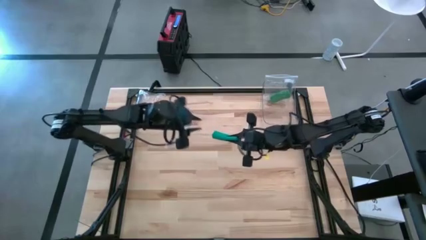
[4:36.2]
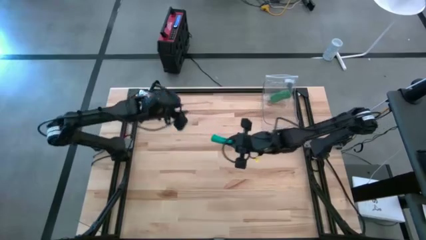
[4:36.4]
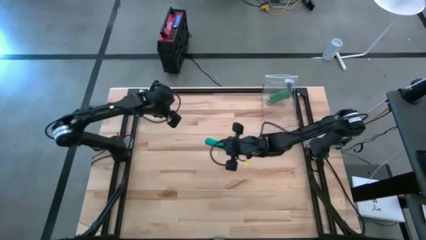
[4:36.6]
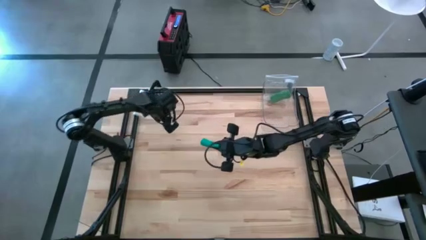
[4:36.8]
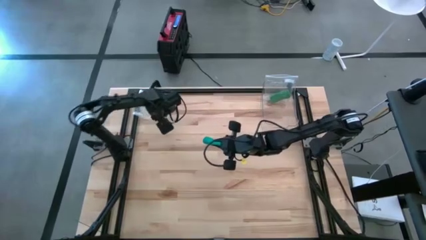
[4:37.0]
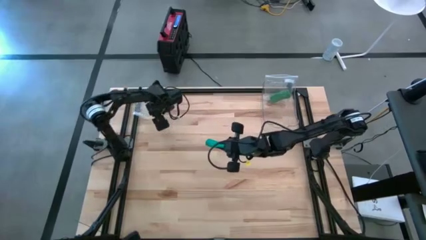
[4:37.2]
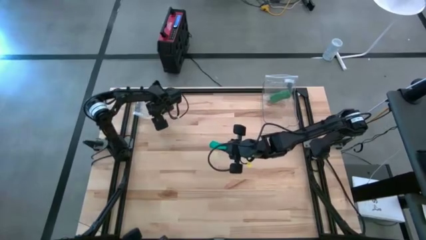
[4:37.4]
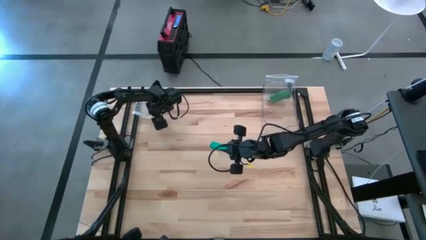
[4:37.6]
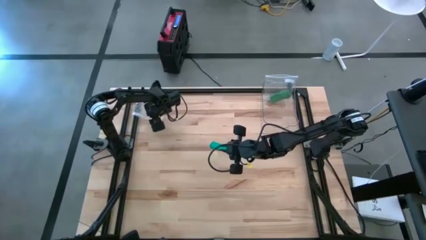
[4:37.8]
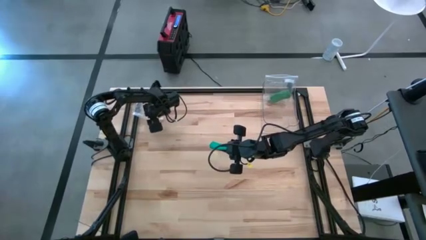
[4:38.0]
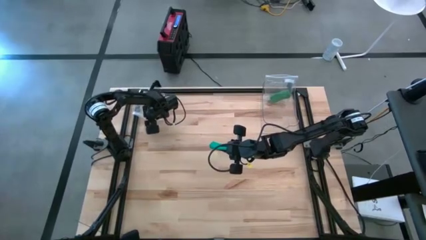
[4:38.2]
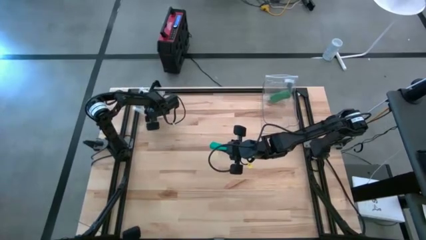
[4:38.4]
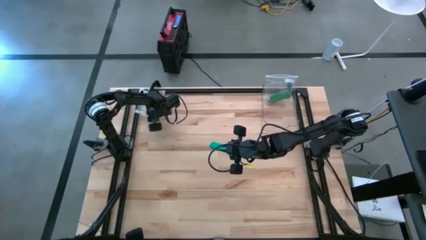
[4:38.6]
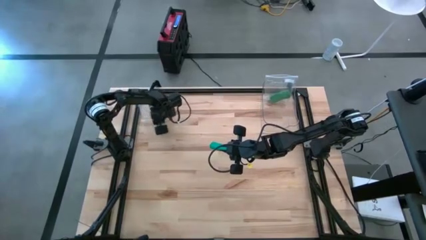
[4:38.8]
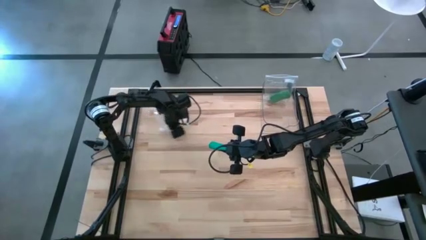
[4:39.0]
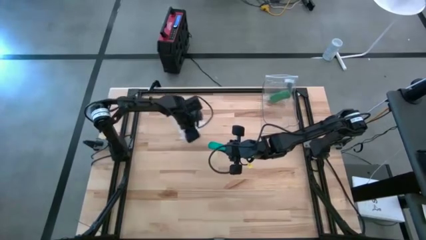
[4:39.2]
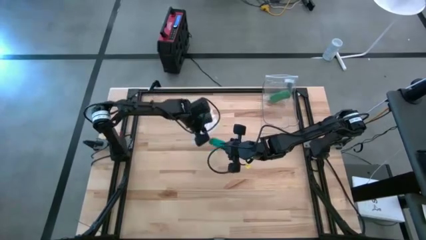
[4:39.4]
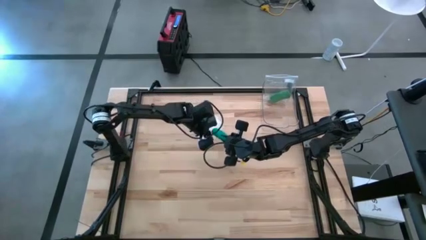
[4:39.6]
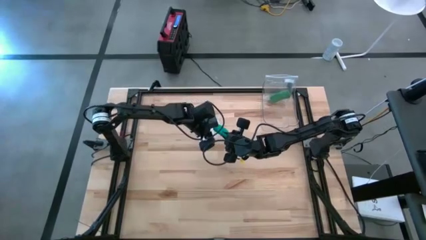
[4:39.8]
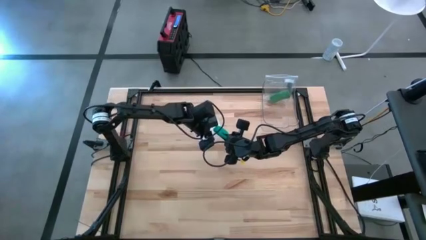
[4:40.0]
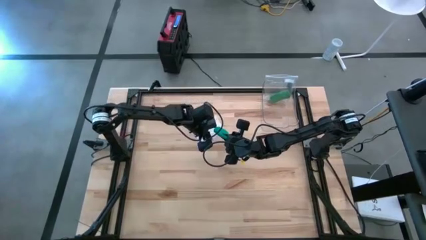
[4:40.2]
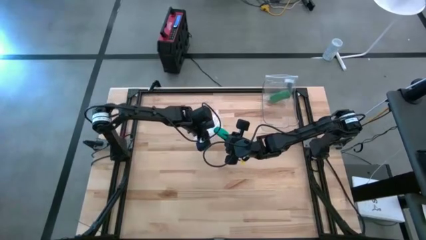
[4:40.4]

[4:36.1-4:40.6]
Task: Roll bandage
Put the rolled dark green bandage into the transparent zip bag

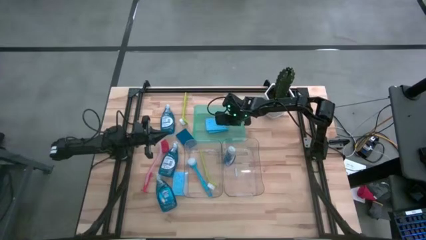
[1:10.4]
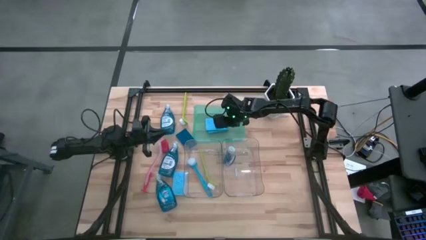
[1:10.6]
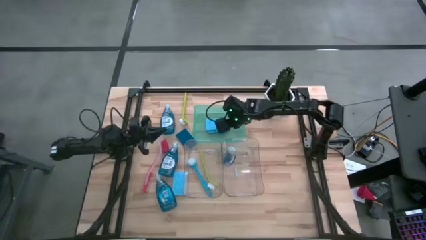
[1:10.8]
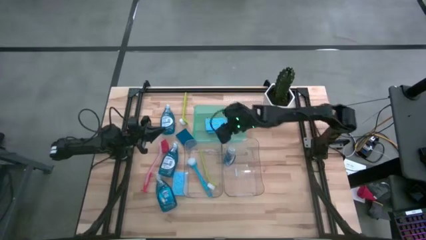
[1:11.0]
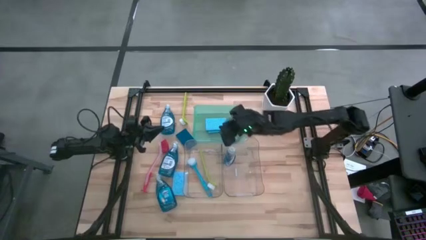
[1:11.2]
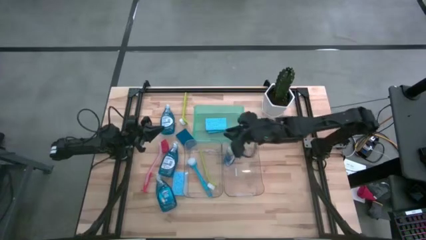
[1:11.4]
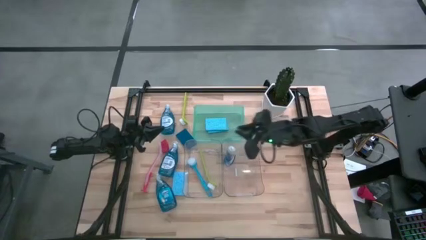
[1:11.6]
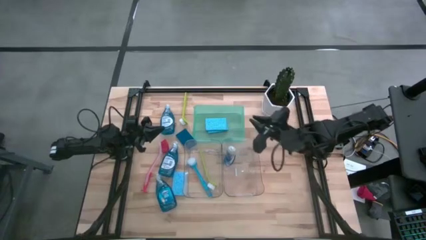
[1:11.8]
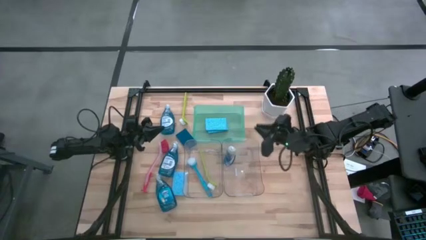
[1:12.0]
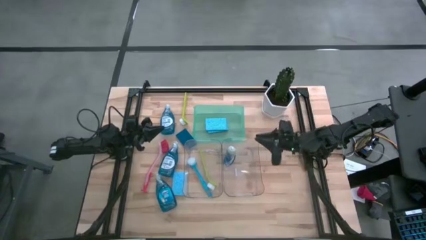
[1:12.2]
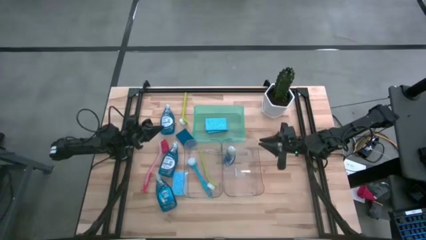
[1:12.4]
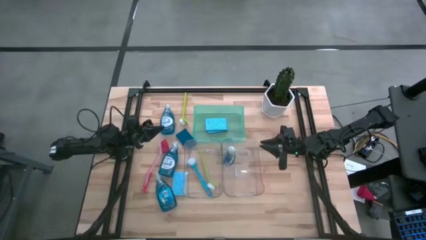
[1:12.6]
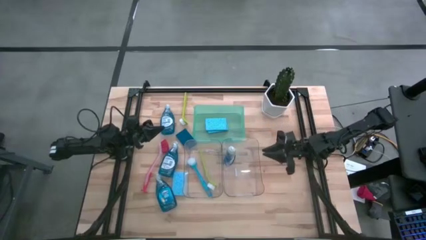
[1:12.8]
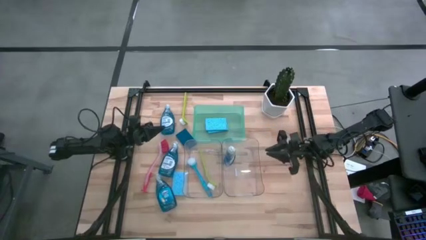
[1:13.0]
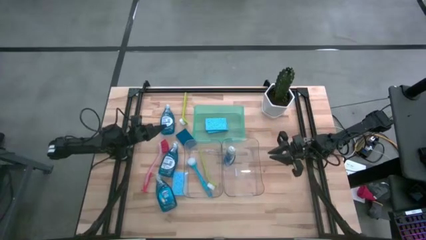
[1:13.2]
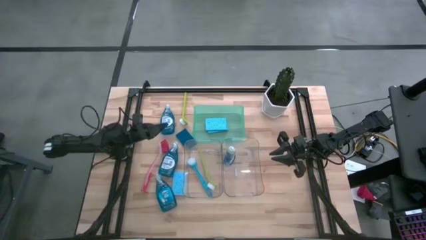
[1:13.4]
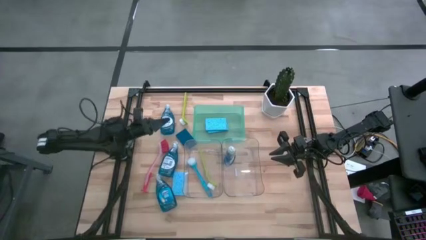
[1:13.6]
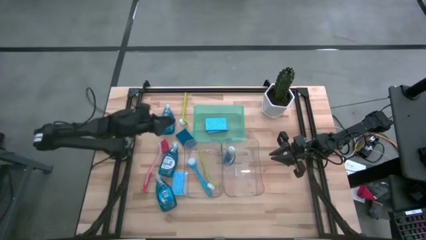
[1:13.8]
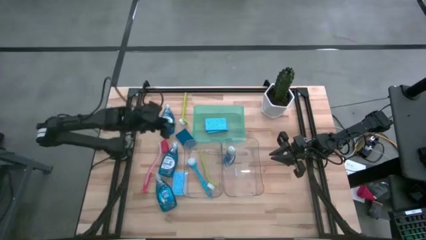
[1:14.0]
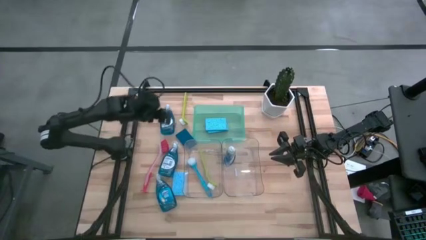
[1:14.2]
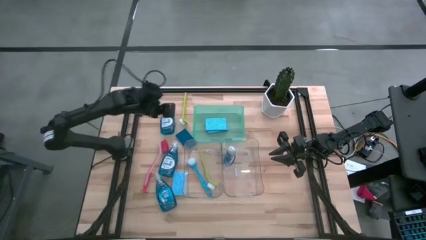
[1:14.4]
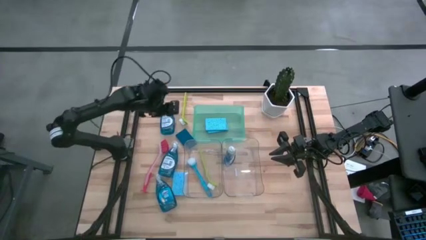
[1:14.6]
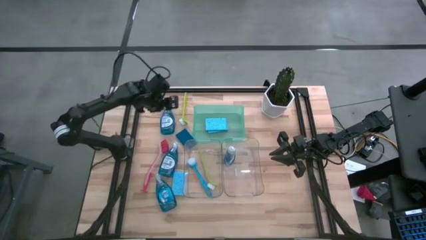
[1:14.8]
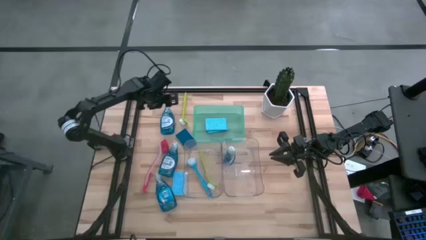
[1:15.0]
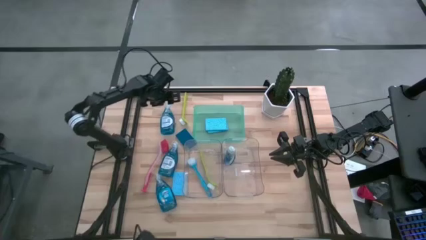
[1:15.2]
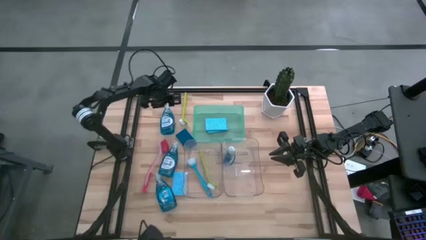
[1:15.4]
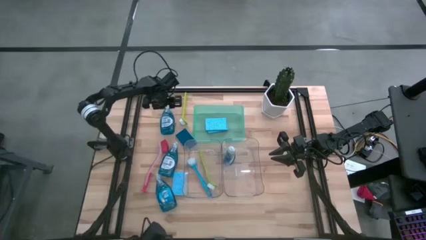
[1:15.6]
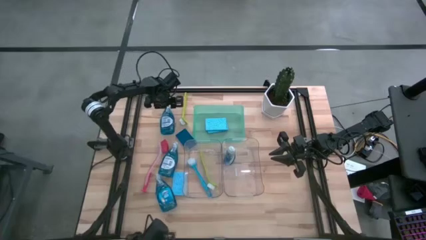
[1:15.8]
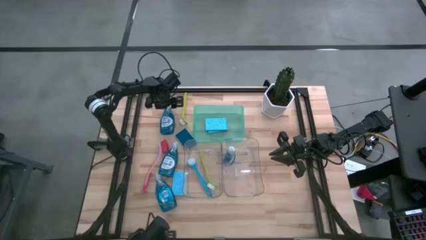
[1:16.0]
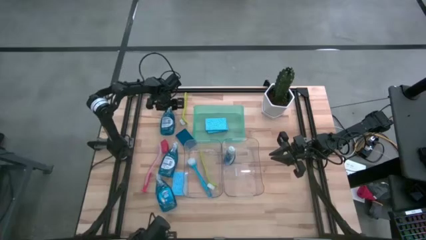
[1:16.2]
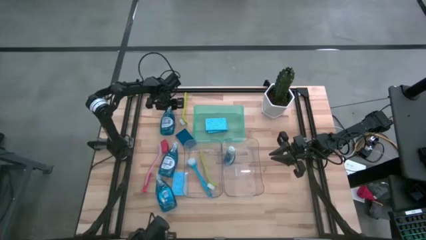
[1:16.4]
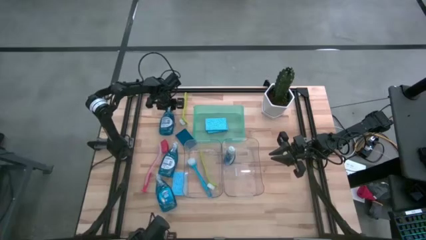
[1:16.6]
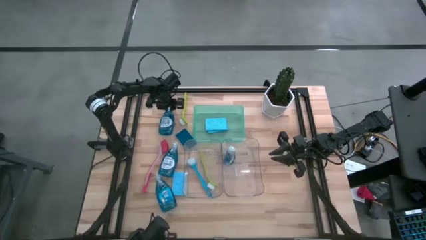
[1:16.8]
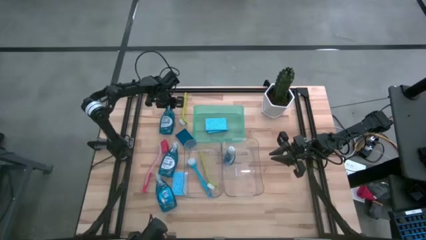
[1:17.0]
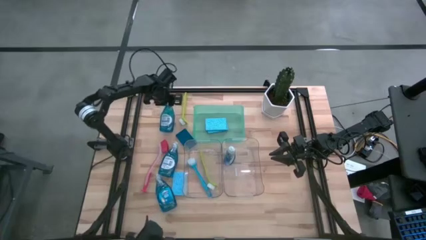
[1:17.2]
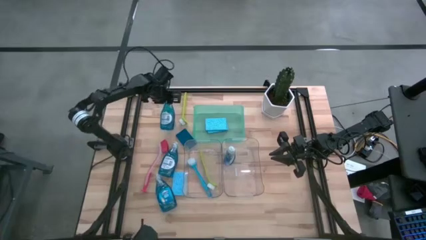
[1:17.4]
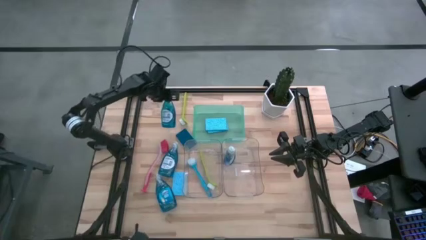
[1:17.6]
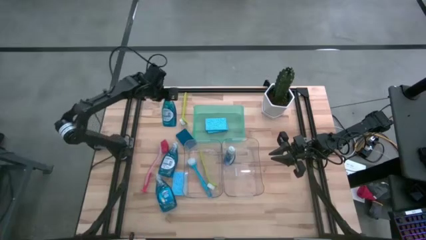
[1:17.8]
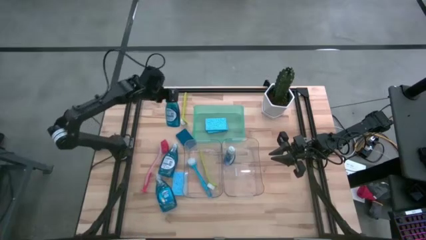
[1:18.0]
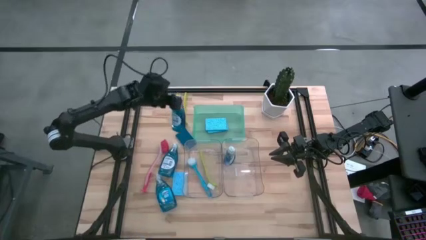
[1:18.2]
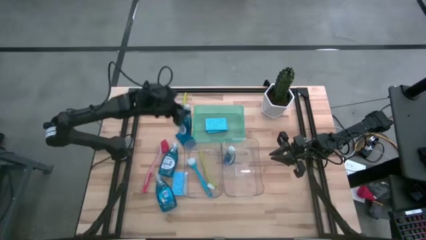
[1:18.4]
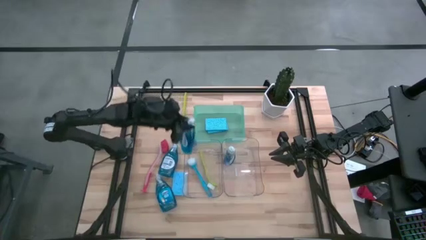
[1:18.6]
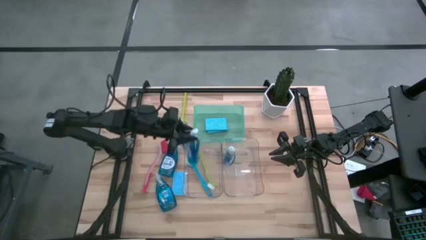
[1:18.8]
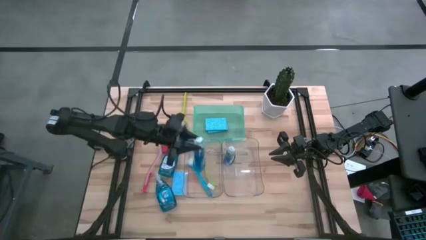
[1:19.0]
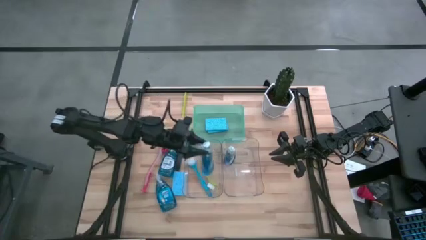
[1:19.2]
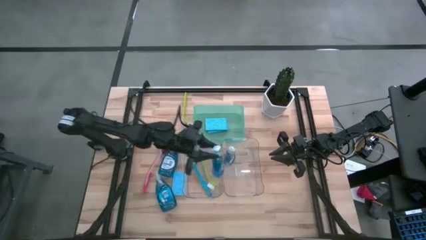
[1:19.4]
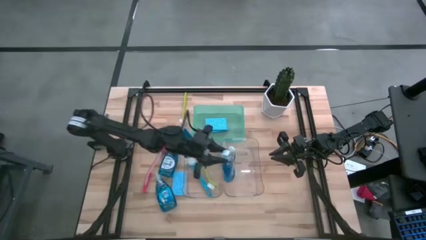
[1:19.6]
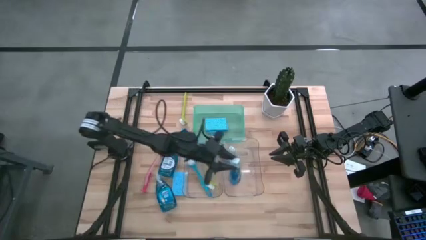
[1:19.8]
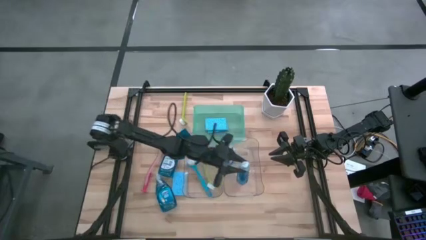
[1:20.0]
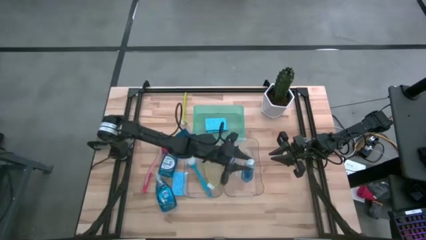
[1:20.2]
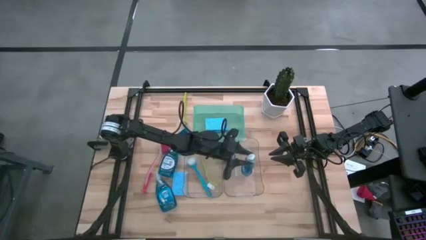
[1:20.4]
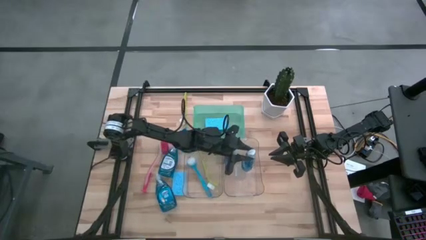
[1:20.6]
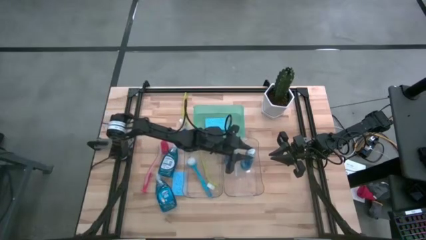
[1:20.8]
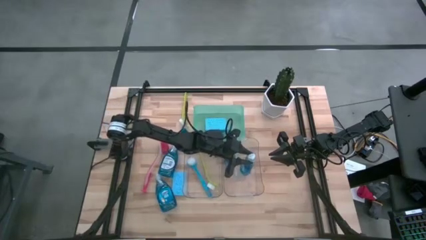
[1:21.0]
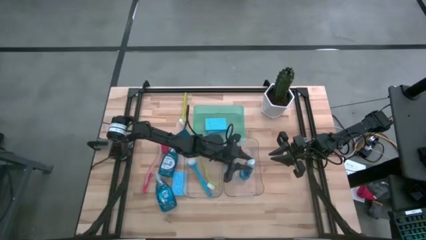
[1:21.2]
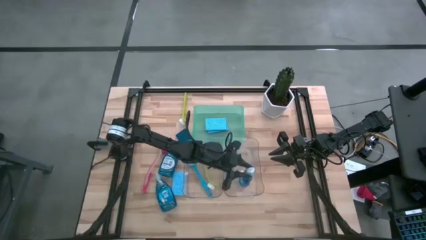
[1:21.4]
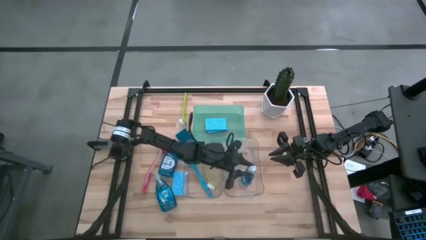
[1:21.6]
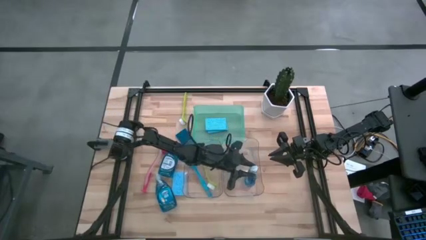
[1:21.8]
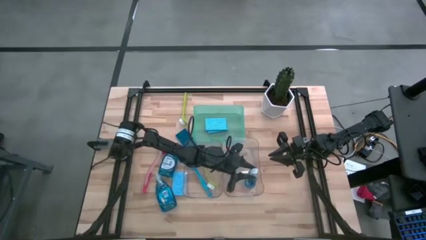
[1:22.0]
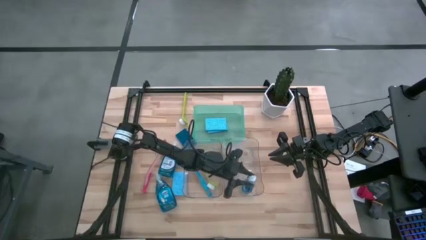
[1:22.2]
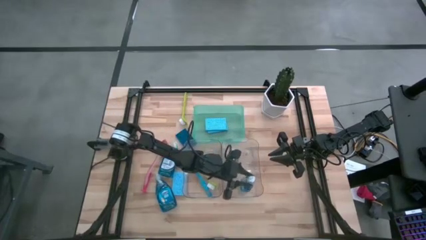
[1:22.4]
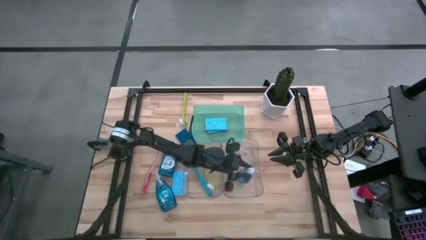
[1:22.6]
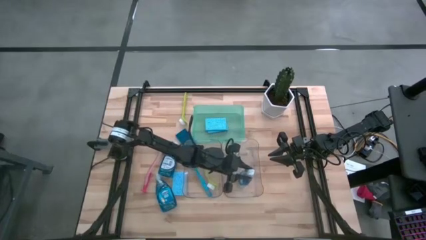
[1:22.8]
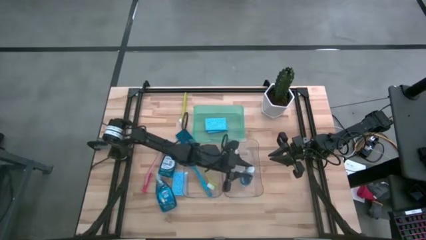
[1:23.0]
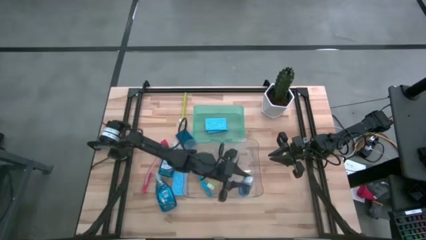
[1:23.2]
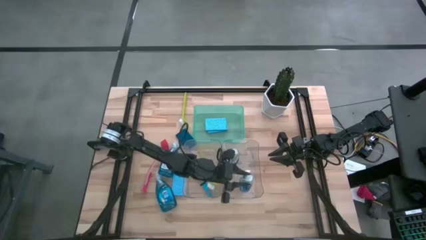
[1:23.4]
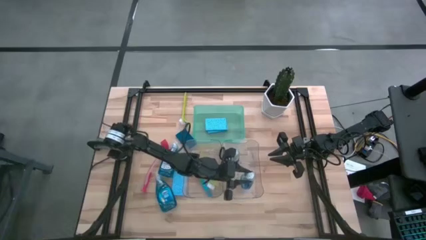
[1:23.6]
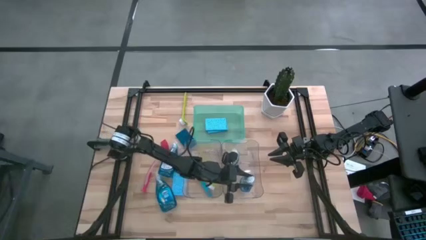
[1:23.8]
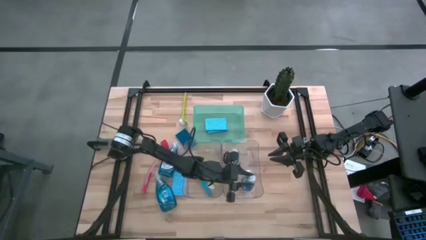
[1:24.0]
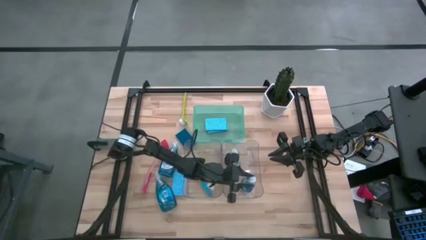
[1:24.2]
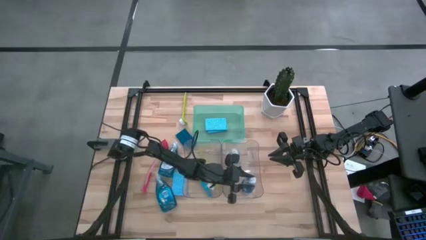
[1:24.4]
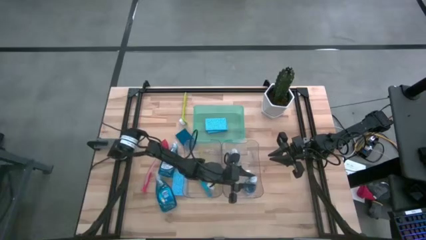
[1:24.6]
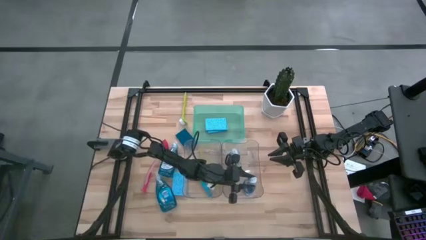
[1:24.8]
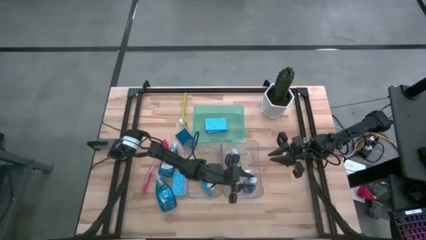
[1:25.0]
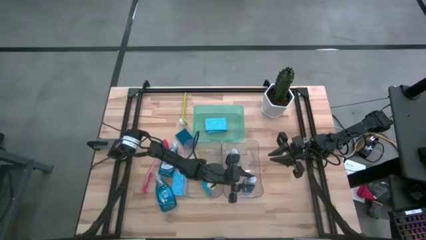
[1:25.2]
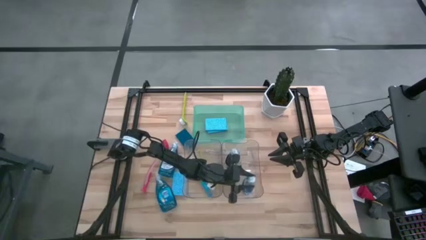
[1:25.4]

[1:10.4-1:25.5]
Task: Pick & Place Kitchen Sink Supplies
Put the blue dishwashing liquid bottle into the right transparent bin
